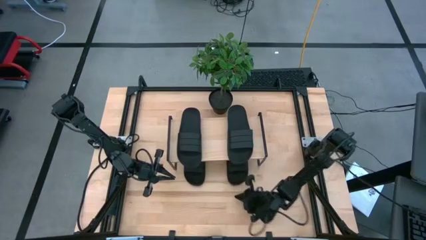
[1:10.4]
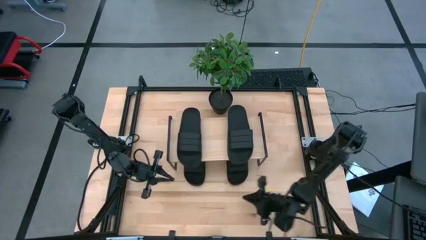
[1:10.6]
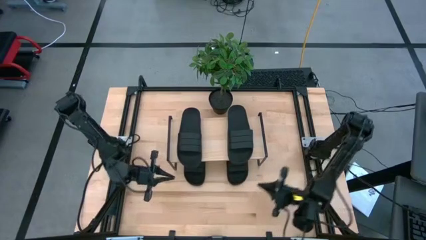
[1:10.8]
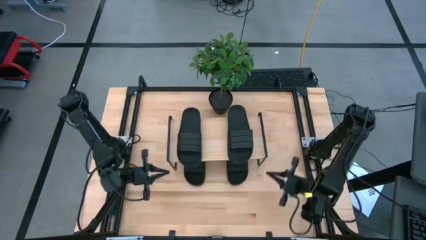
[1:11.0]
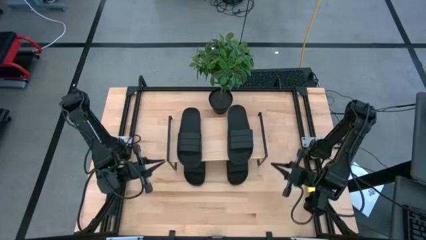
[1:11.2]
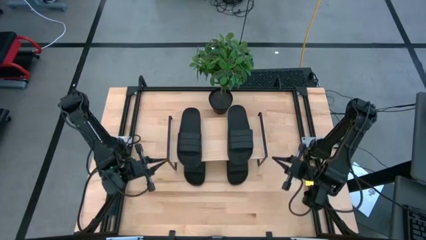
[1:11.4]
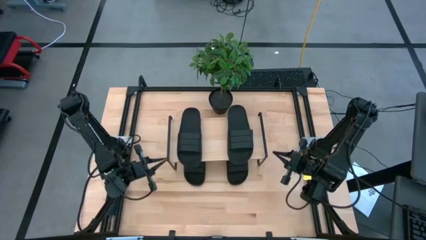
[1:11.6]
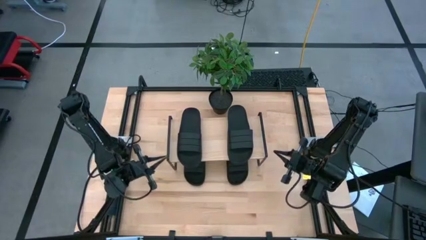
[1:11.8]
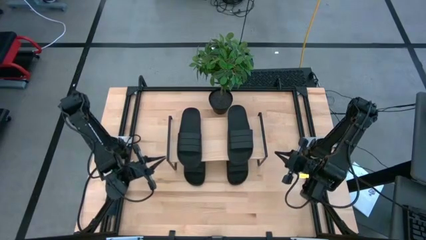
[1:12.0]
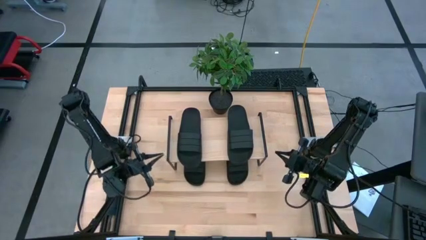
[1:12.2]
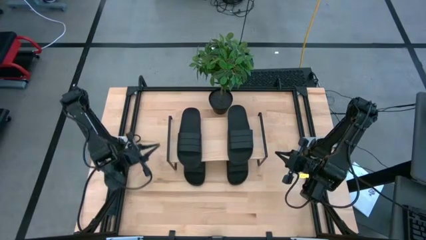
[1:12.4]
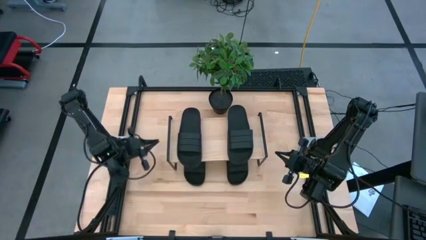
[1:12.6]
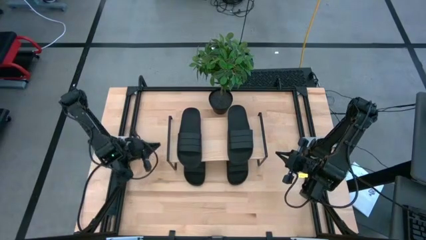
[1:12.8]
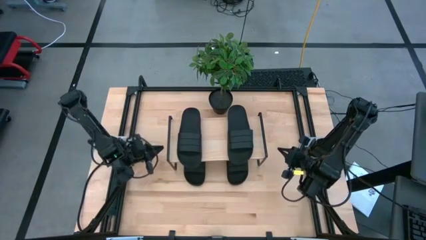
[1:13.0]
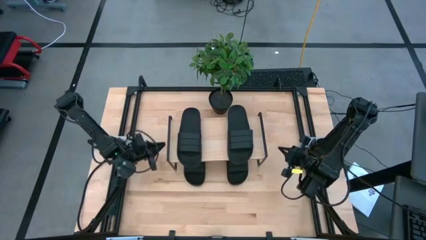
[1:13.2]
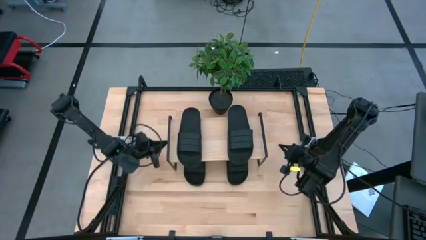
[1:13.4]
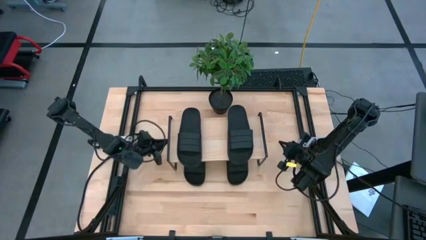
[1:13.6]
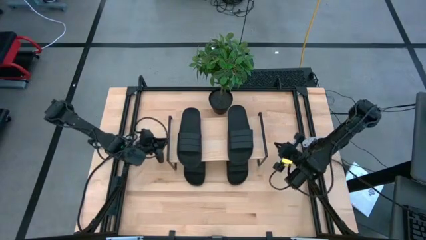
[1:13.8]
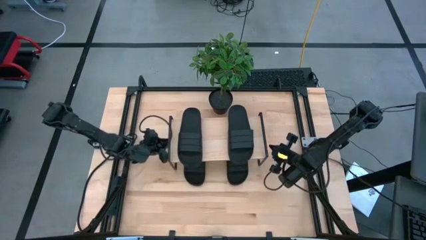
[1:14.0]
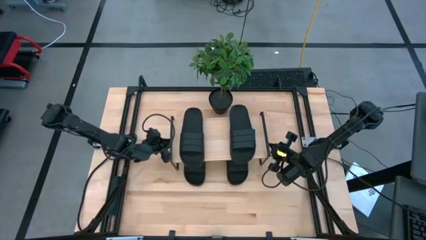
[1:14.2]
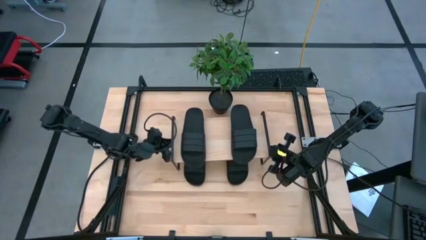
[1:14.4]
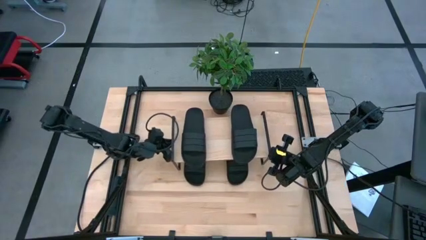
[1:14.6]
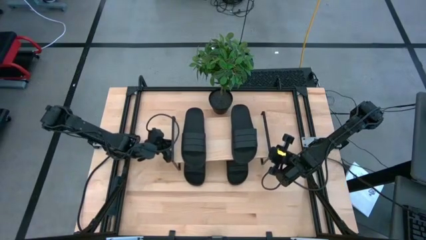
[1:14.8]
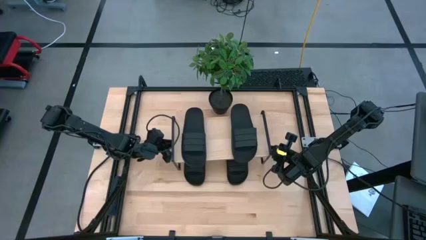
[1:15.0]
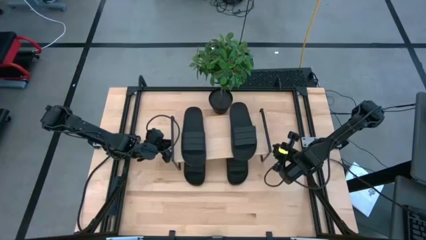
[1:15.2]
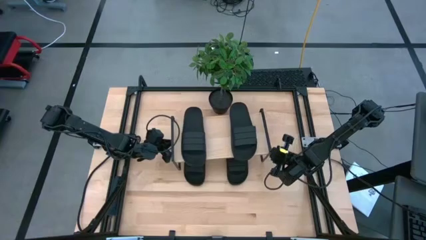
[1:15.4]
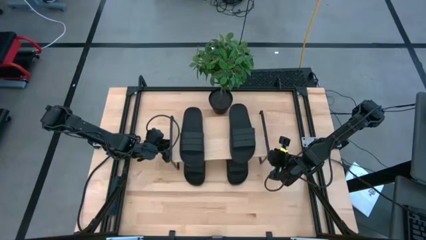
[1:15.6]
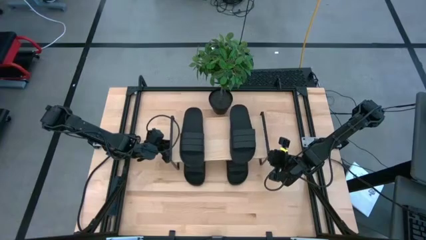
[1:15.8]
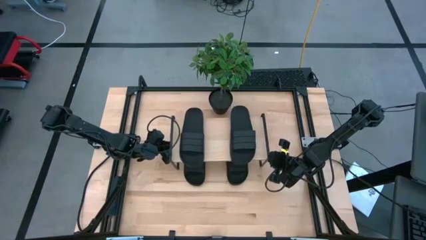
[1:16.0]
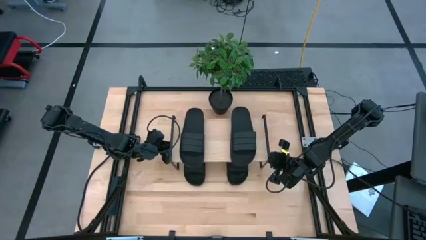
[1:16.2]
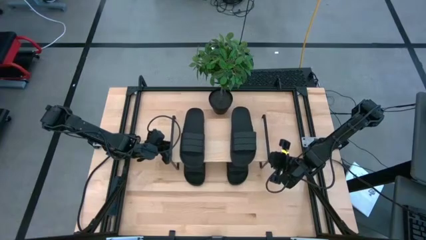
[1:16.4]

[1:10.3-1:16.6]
Task: Pick and place slides into the shelf
Adjust the shelf

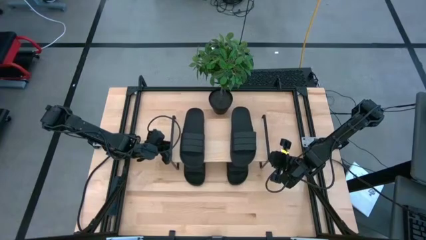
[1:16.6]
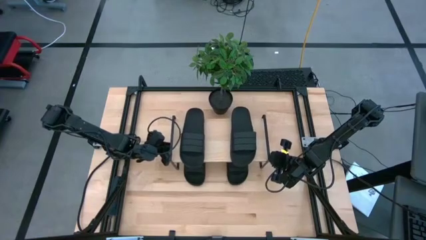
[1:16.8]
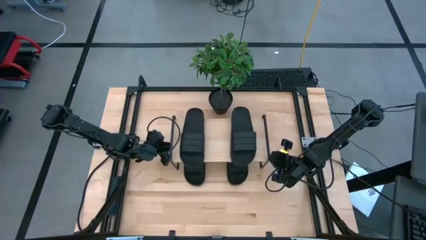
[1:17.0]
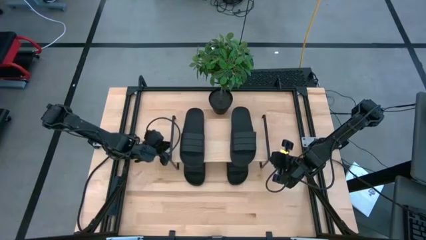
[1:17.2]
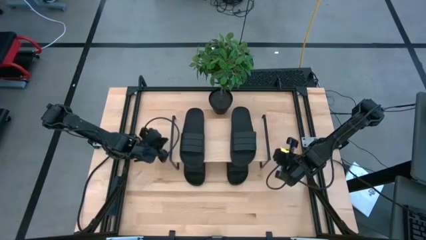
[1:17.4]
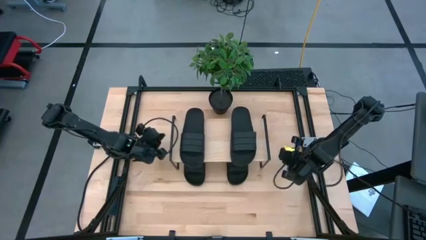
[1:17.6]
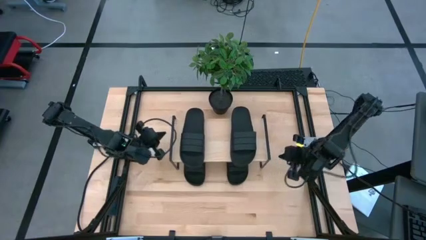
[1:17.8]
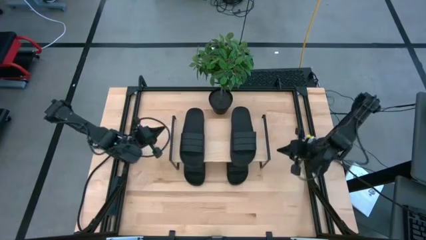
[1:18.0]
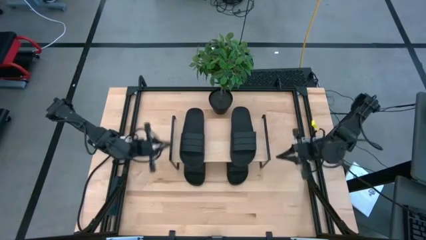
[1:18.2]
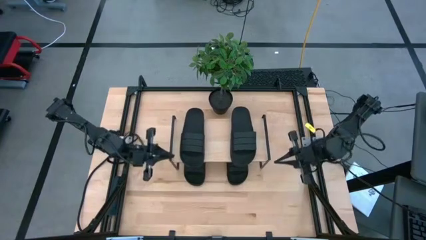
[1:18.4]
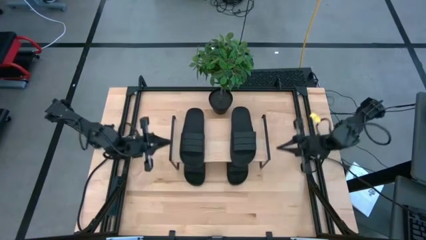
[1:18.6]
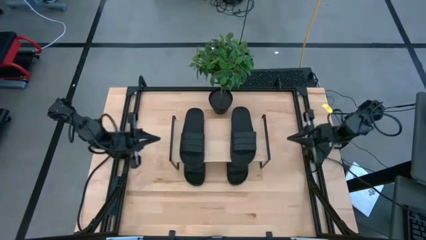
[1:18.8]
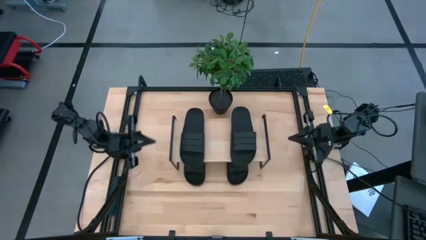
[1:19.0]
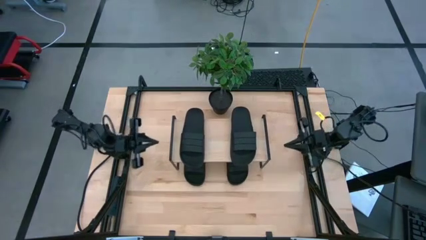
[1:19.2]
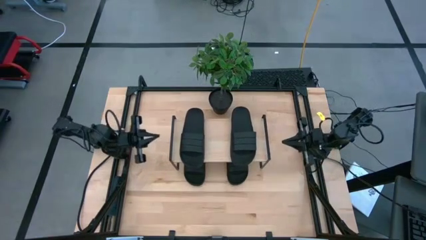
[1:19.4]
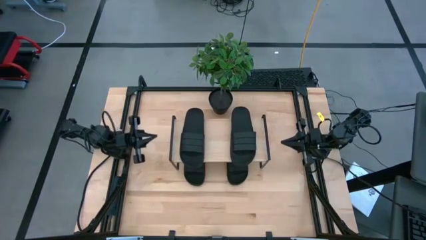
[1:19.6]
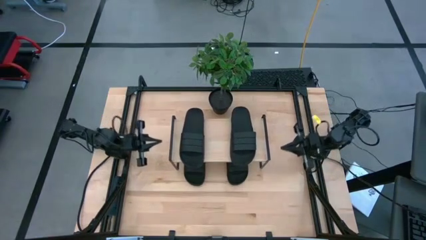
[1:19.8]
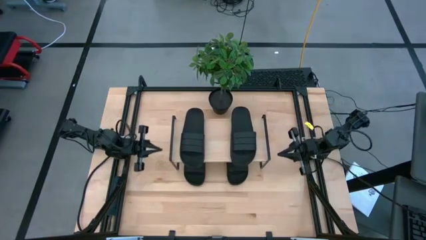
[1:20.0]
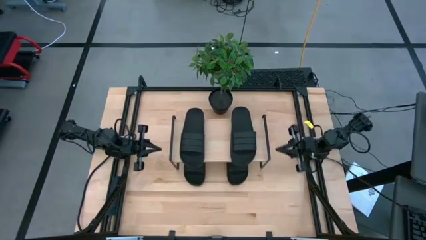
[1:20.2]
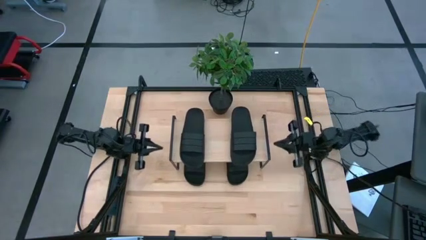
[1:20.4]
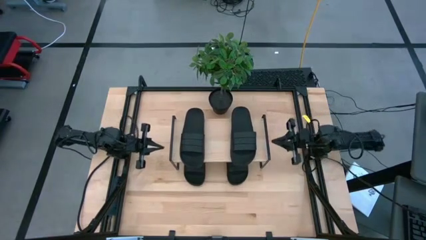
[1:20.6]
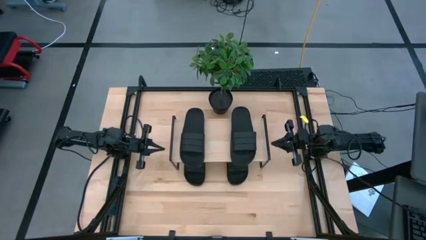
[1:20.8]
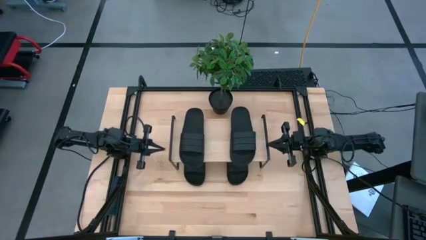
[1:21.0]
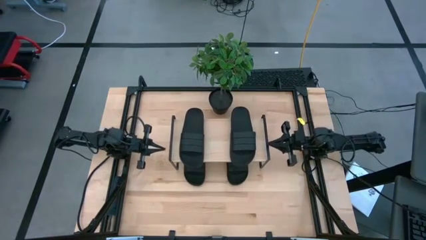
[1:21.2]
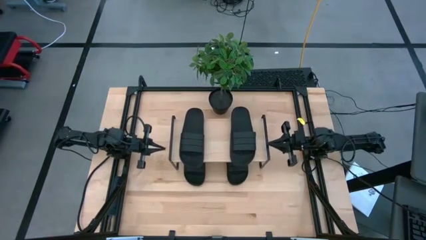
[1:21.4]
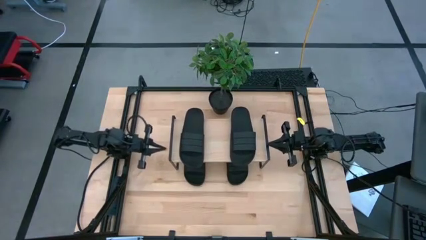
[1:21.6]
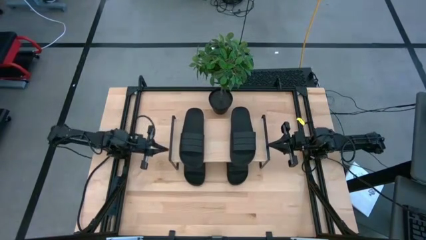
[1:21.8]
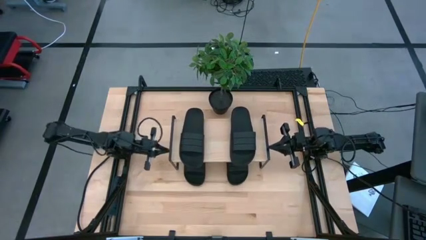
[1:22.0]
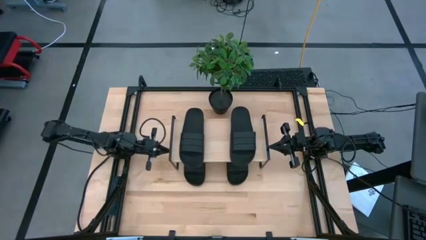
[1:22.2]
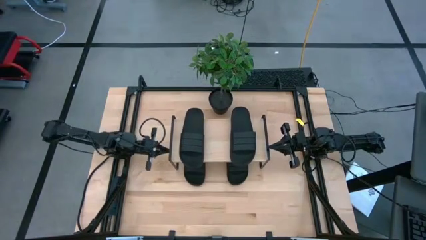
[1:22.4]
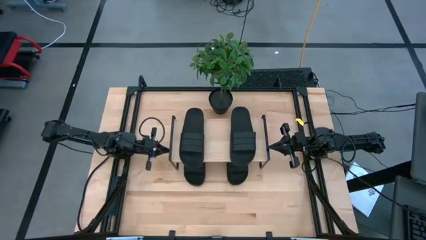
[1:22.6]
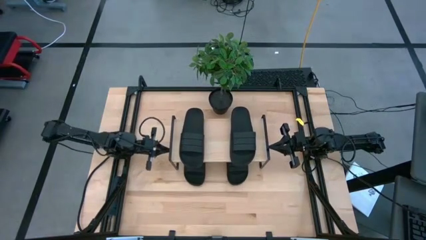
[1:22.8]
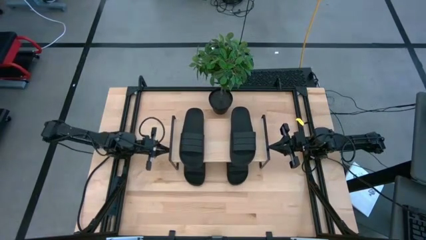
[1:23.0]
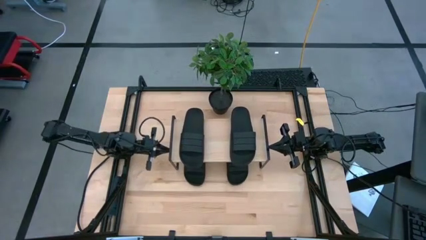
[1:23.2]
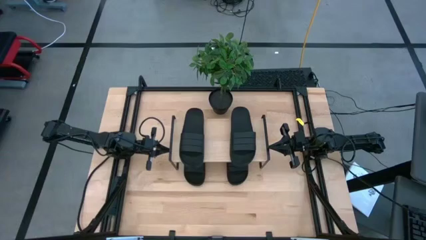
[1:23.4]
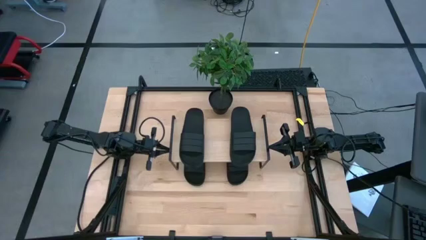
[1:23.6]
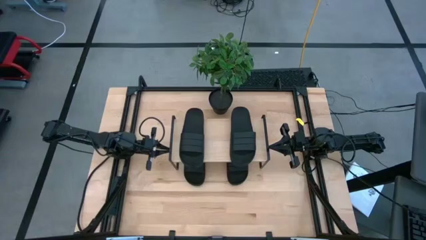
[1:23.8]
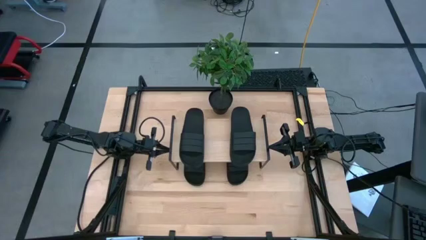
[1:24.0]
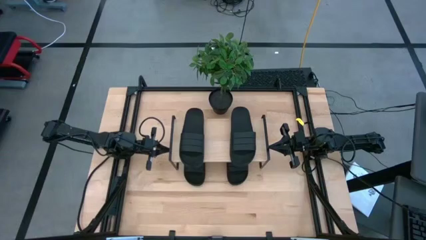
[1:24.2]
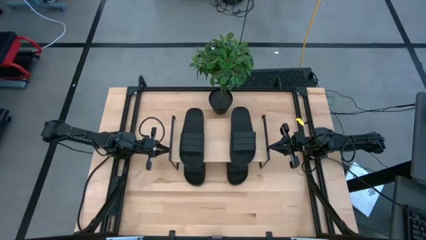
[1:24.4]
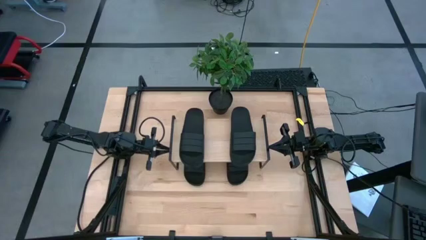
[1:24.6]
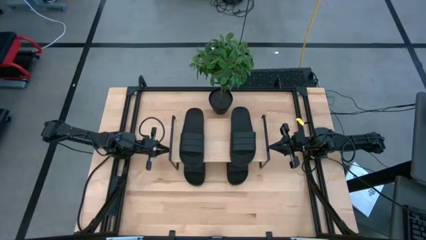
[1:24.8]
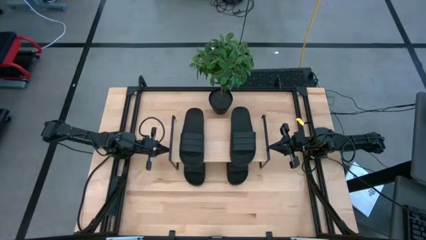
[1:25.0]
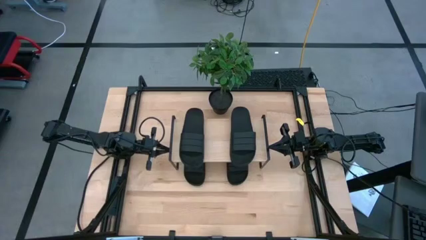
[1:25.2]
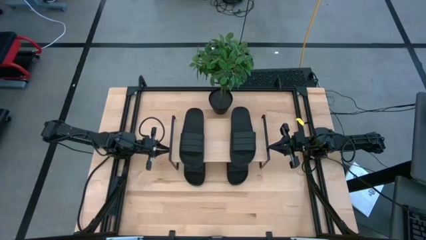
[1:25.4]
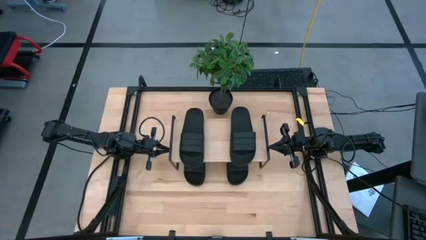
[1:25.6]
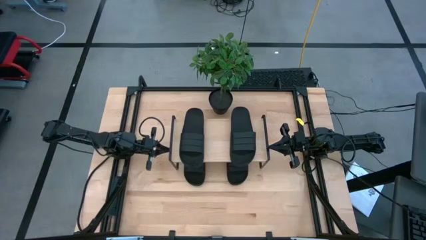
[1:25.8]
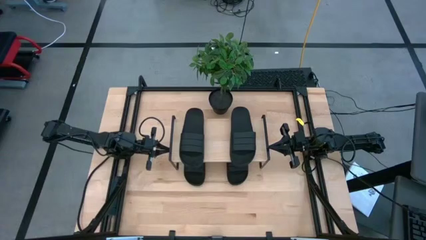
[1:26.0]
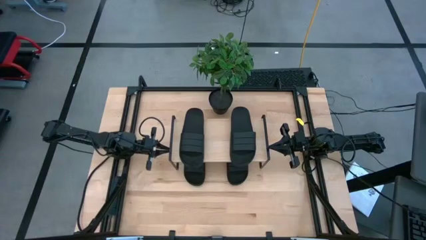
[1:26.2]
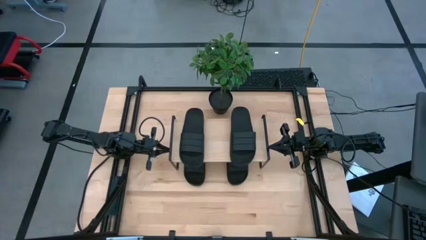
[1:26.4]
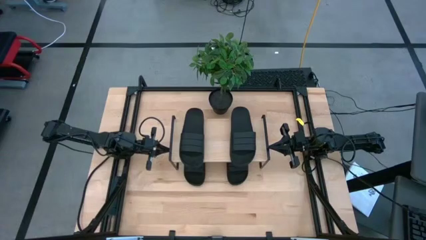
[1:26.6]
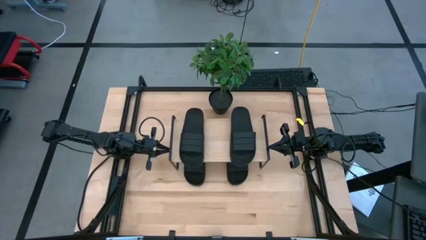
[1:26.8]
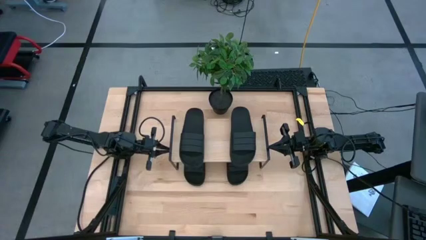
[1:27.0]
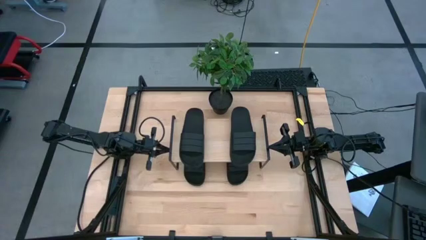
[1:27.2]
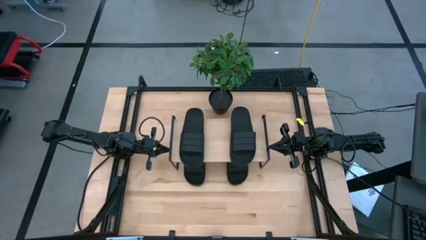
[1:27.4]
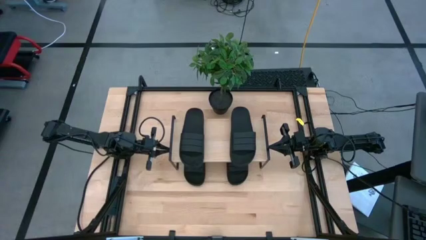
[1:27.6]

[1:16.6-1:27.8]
Return to Home Position
